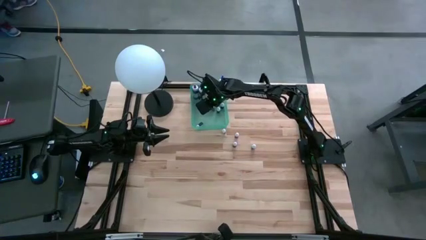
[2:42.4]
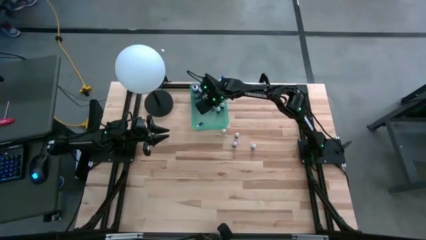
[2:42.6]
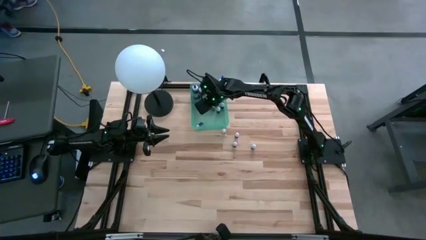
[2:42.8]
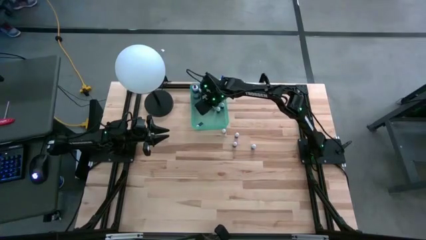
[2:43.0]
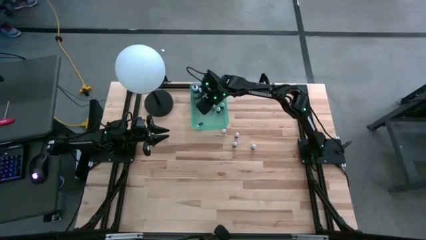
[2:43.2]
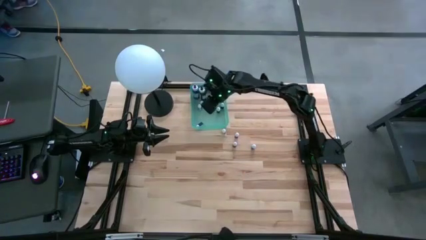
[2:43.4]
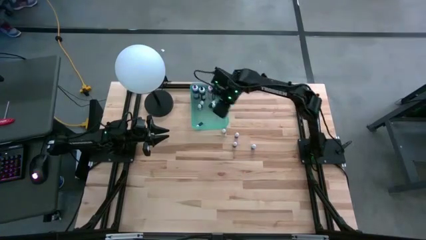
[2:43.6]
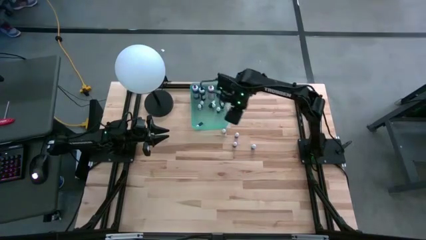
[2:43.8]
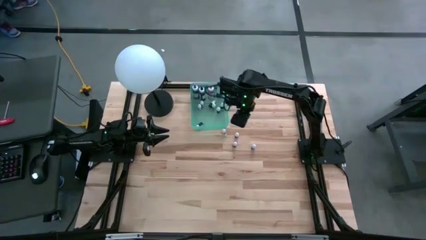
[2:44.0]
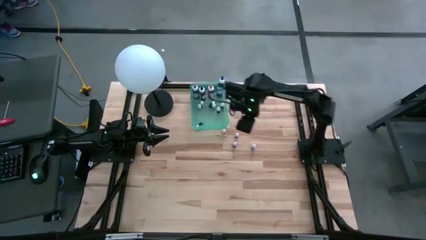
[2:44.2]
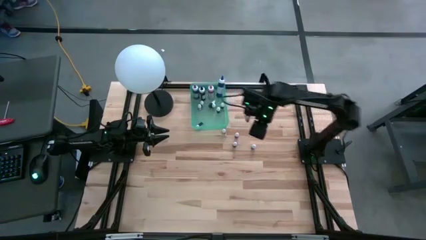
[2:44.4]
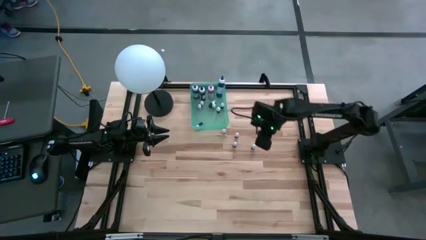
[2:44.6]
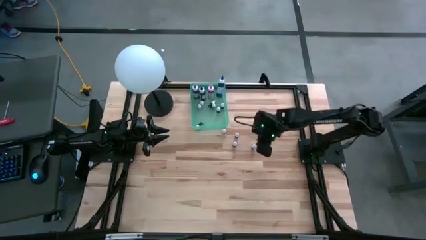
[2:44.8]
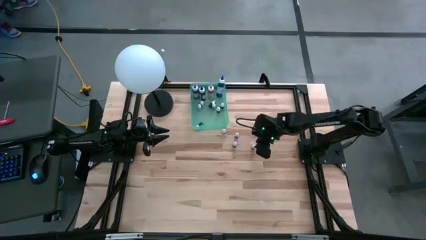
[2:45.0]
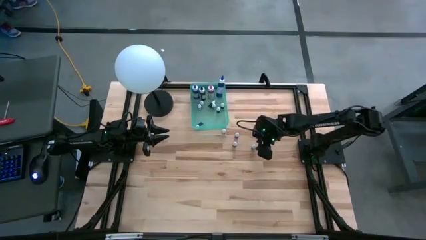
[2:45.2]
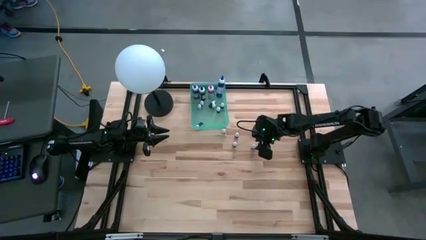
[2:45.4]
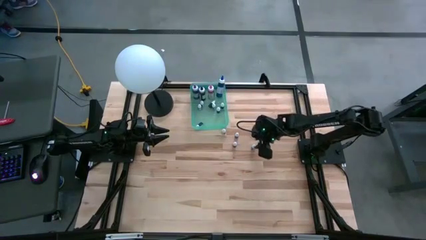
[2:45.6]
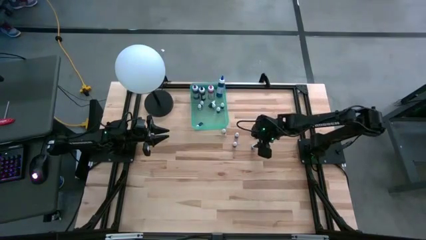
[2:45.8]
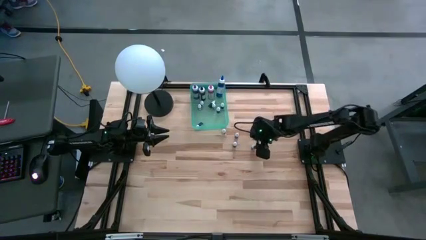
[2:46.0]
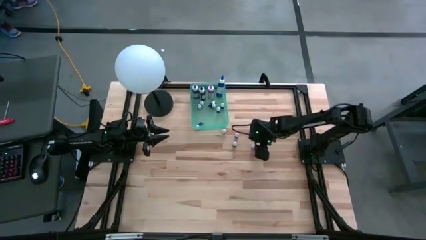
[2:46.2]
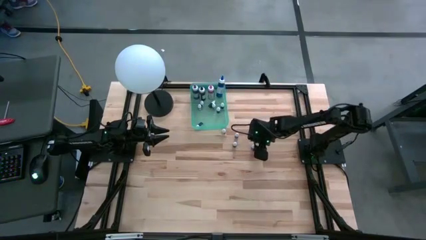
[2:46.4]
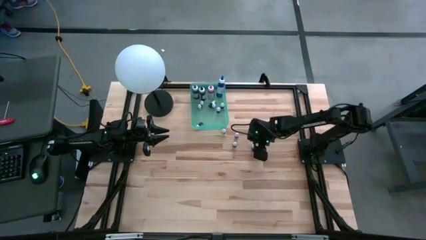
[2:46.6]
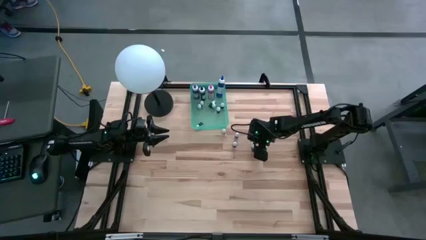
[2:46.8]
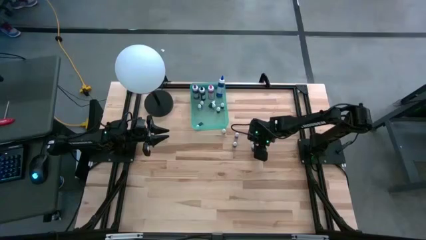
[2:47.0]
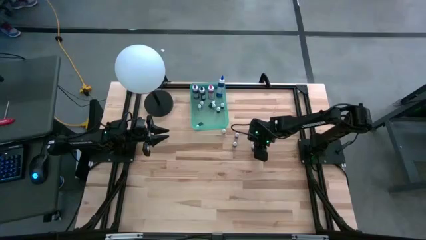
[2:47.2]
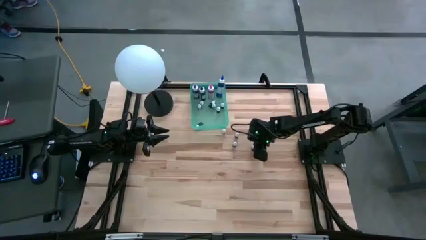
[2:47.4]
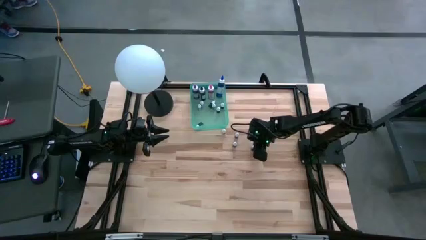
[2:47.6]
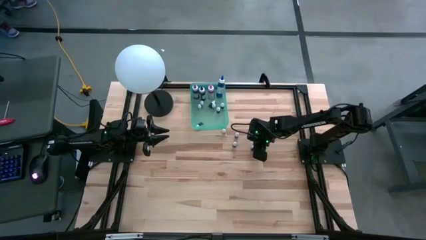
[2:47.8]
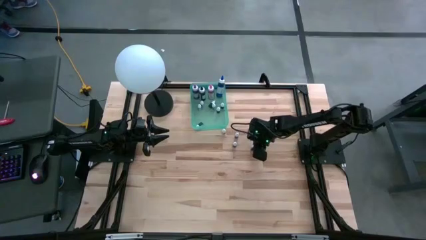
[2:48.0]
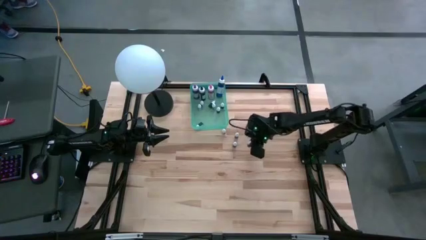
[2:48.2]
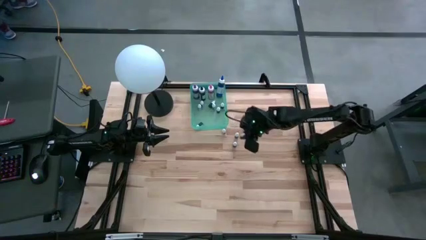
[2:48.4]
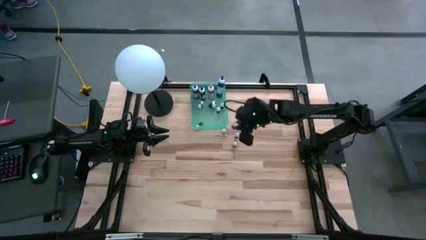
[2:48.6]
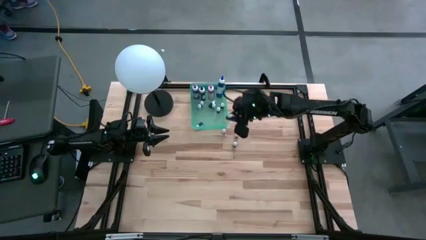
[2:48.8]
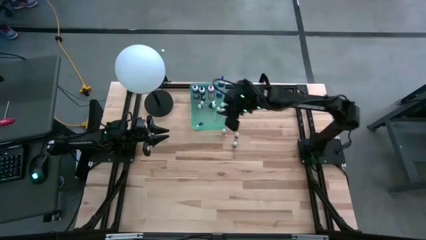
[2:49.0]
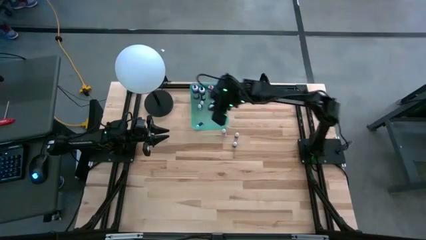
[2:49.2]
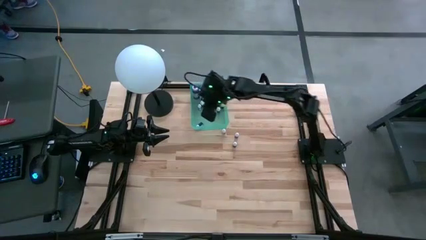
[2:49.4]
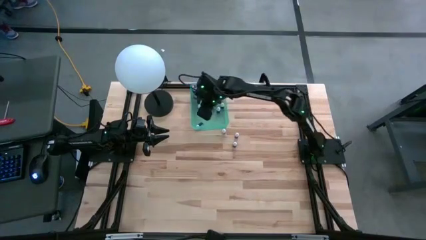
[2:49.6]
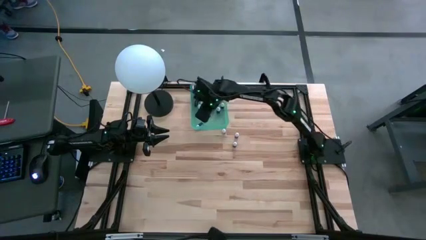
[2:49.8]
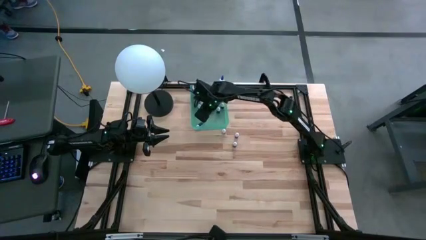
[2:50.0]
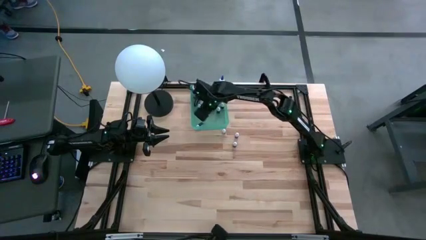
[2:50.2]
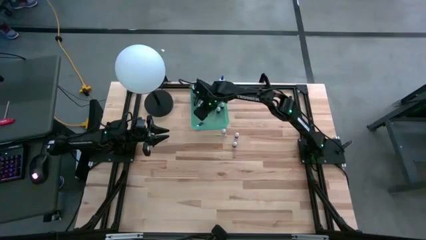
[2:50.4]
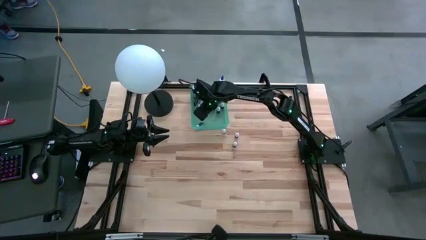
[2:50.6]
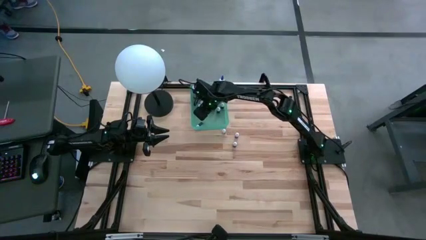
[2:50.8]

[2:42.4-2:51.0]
Task: Pick & Place food coloring
Put the small purple food coloring bottle into the blue bin

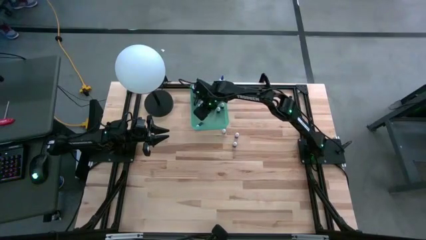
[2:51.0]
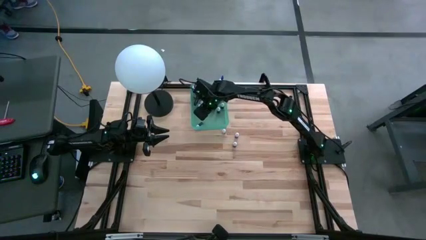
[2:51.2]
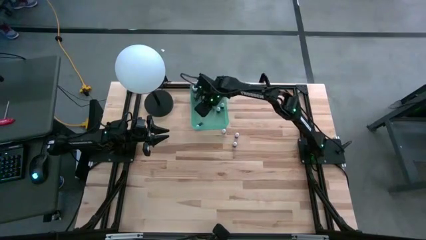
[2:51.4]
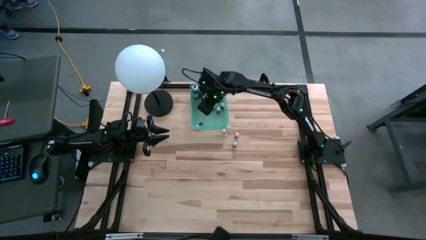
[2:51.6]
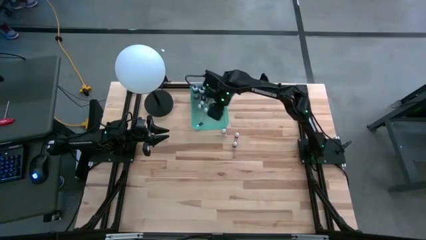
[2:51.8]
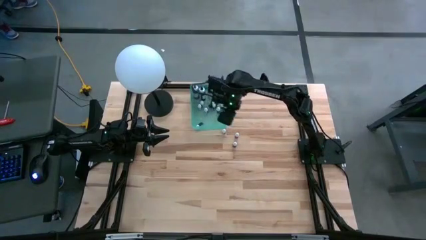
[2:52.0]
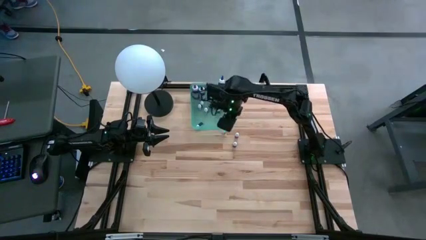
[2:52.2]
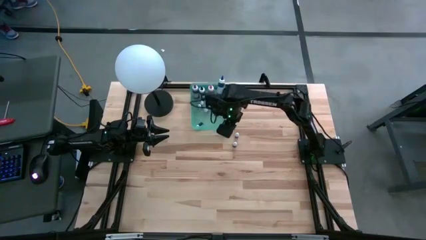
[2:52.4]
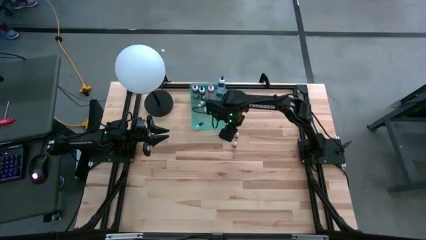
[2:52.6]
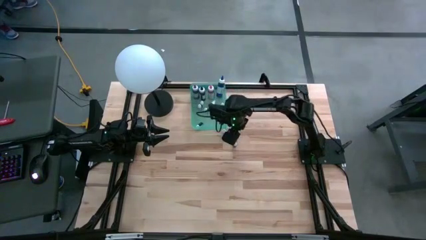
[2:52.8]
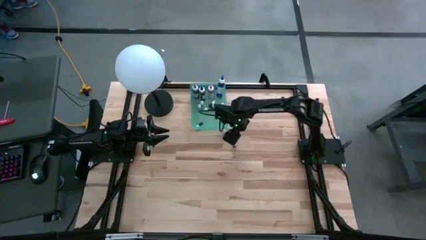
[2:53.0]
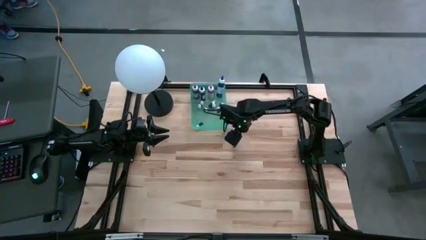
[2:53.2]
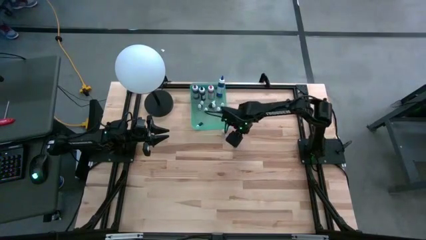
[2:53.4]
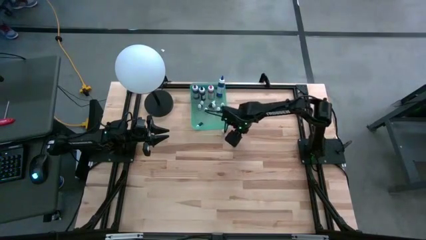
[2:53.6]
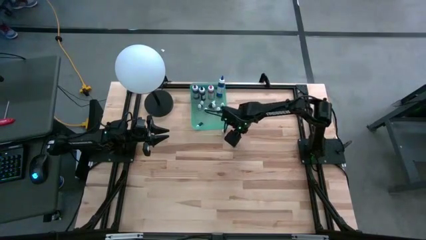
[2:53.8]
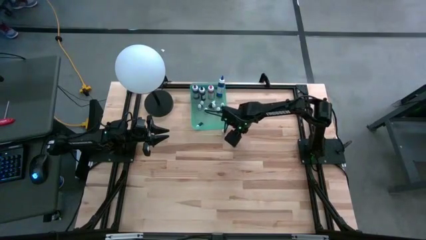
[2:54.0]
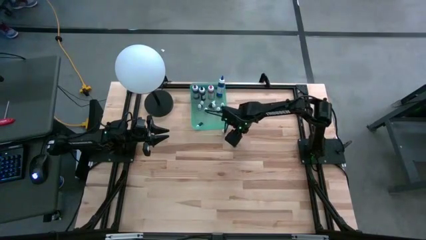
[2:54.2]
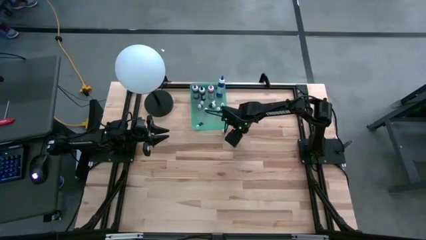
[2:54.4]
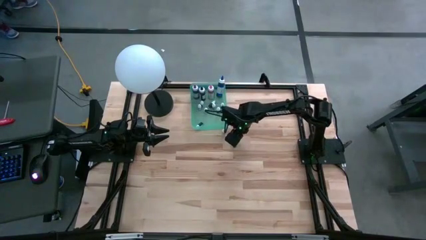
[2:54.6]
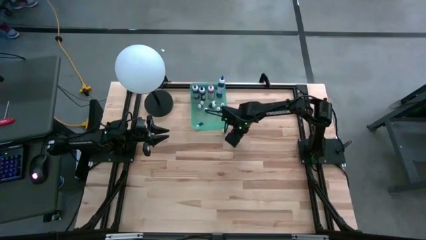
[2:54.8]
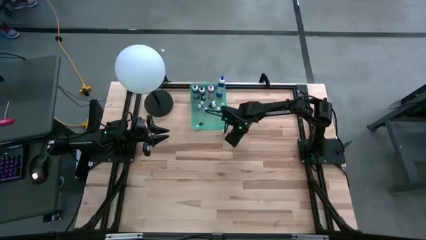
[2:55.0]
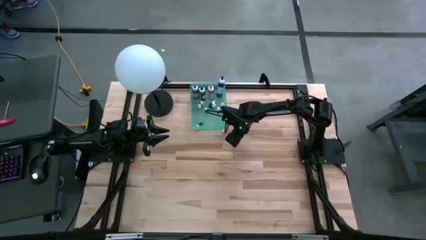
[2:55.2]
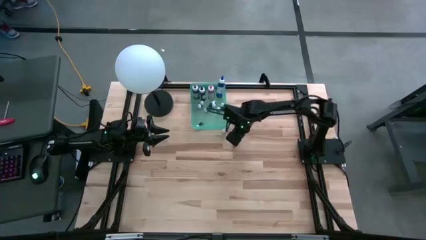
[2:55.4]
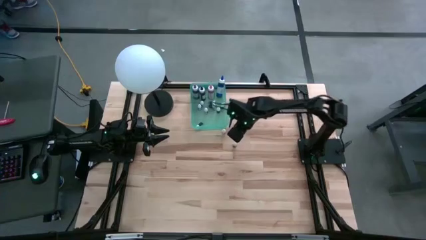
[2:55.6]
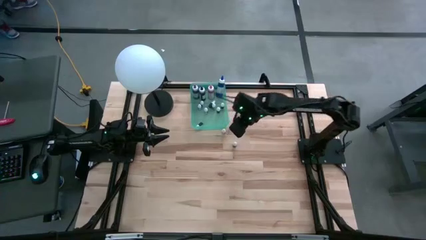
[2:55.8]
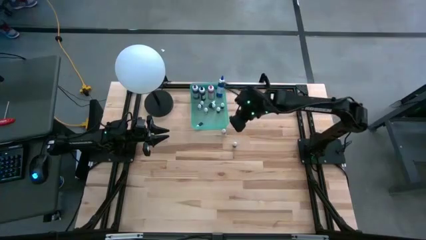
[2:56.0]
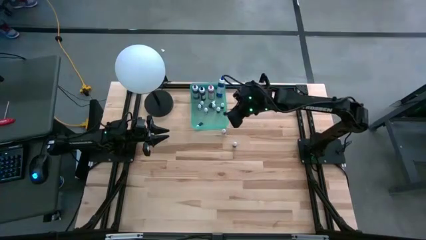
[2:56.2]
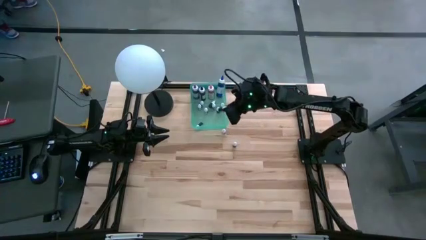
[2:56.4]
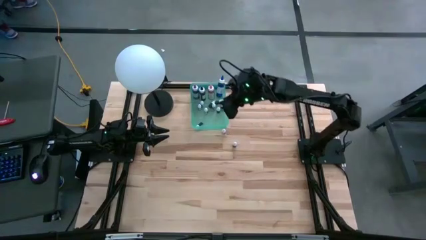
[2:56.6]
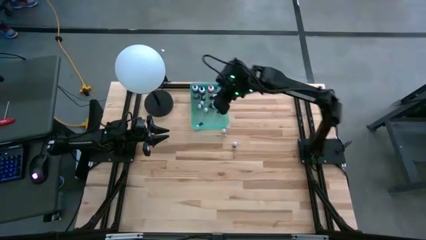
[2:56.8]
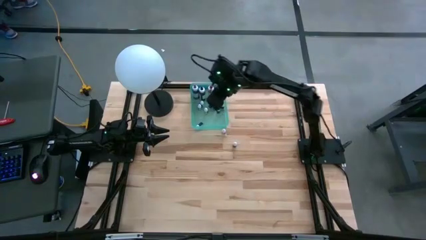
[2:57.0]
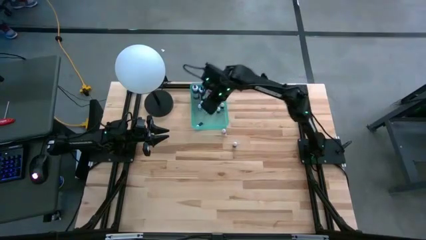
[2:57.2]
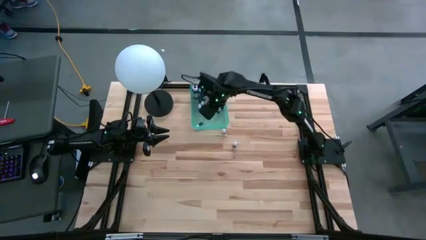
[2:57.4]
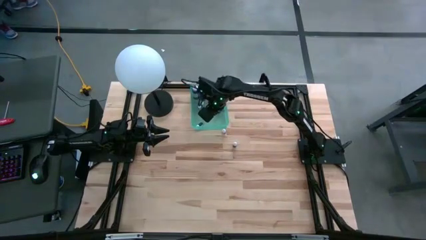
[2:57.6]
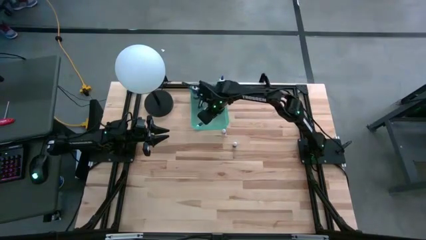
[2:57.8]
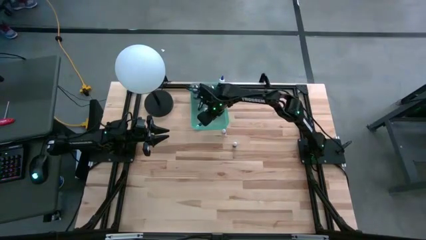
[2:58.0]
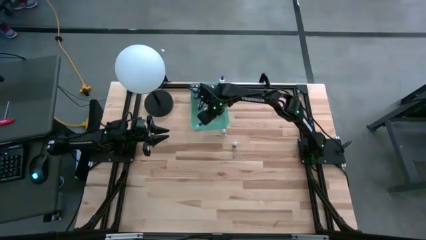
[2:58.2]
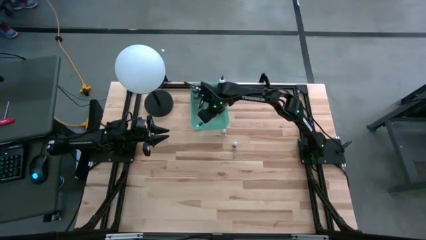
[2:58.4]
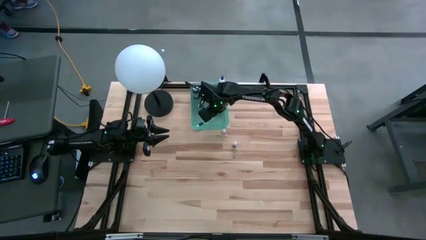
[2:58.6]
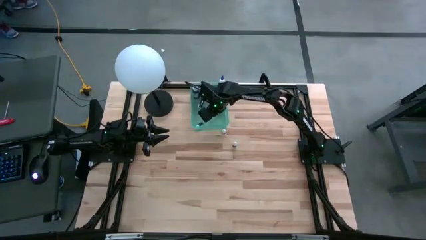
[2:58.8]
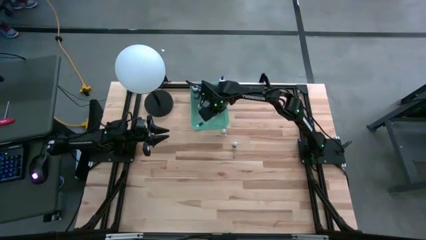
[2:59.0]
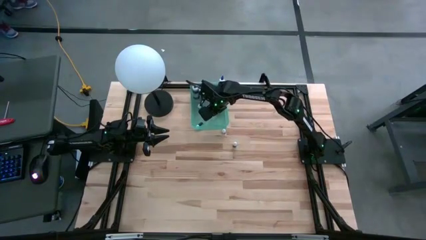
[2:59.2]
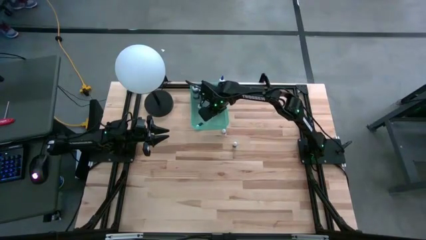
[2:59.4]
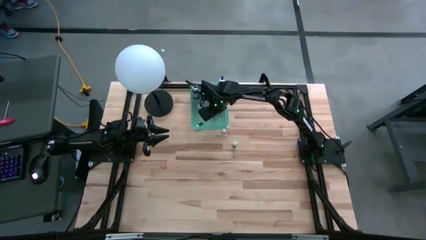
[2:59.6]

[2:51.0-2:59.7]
Put the small red food coloring bottle into the blue bin
